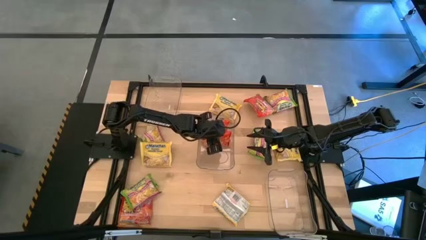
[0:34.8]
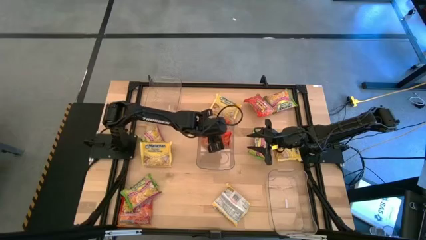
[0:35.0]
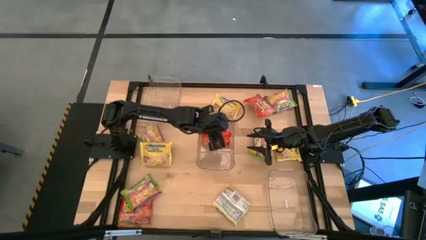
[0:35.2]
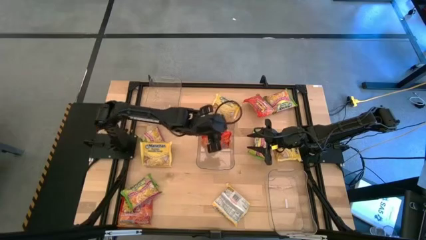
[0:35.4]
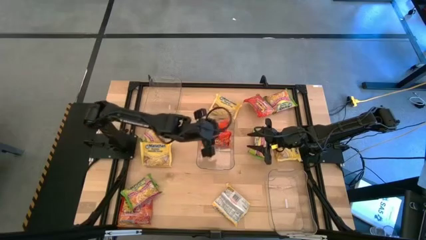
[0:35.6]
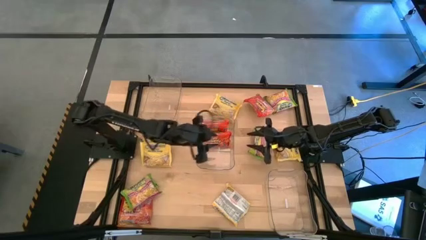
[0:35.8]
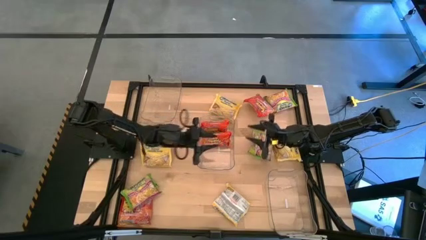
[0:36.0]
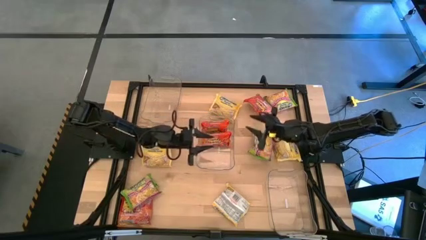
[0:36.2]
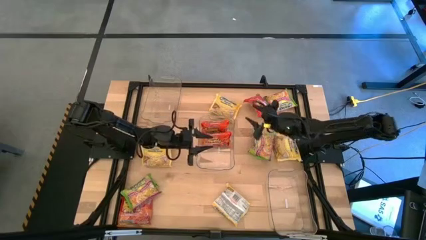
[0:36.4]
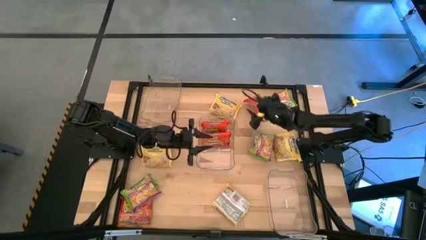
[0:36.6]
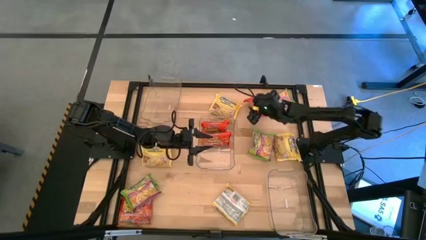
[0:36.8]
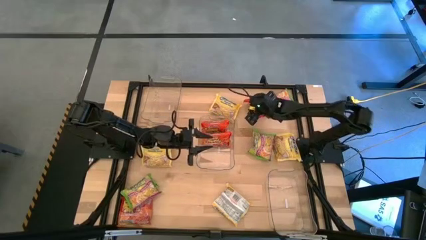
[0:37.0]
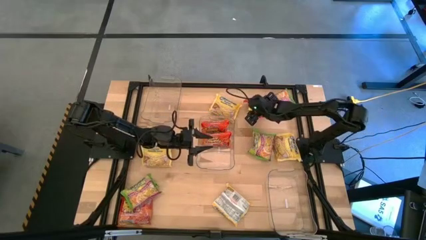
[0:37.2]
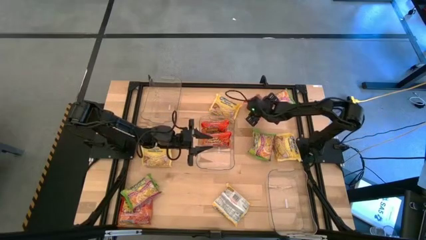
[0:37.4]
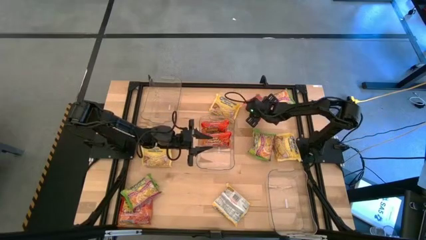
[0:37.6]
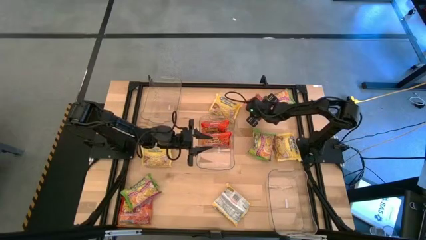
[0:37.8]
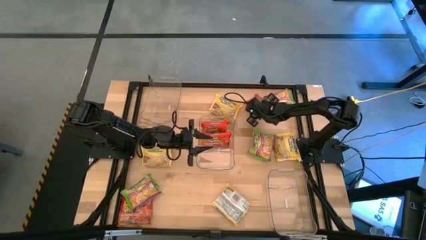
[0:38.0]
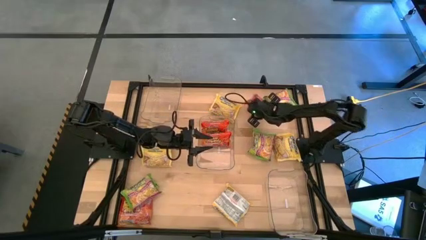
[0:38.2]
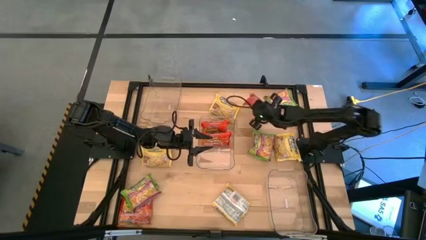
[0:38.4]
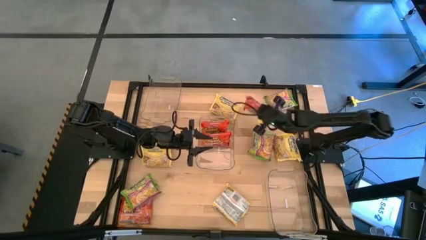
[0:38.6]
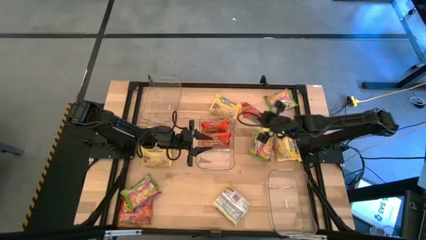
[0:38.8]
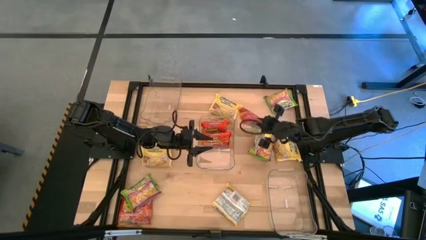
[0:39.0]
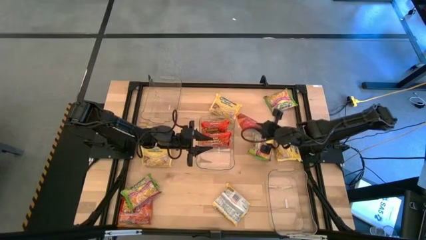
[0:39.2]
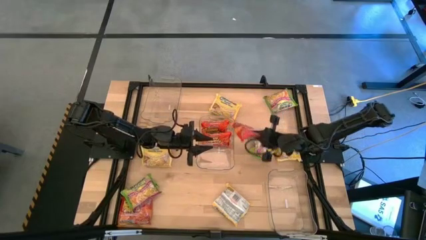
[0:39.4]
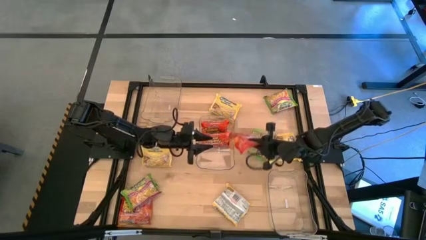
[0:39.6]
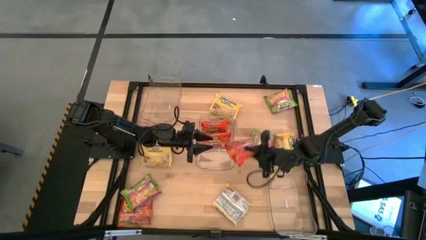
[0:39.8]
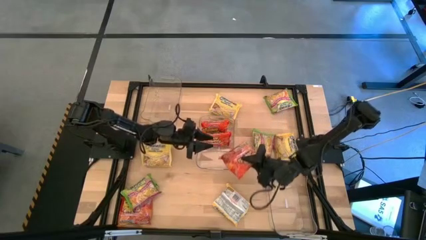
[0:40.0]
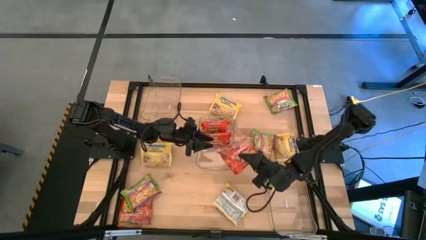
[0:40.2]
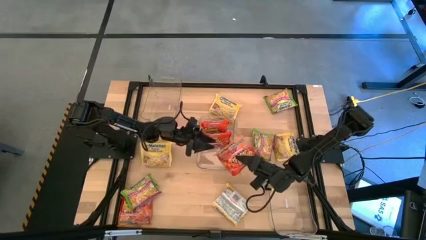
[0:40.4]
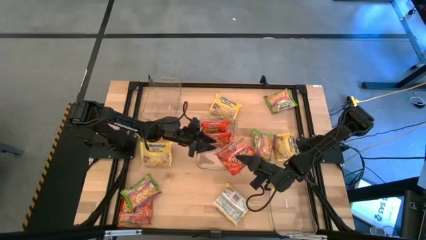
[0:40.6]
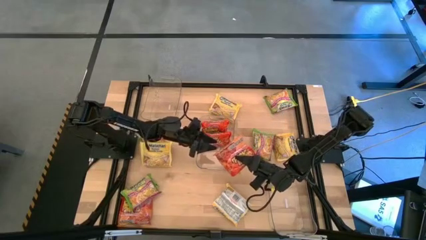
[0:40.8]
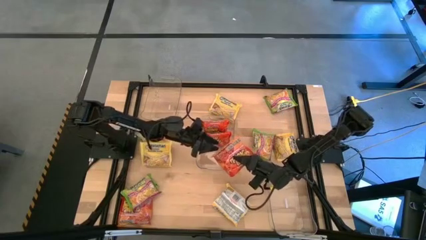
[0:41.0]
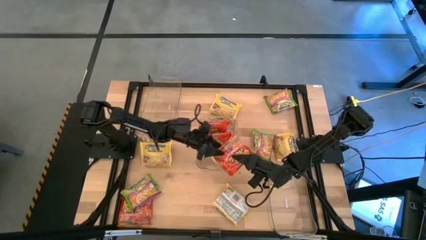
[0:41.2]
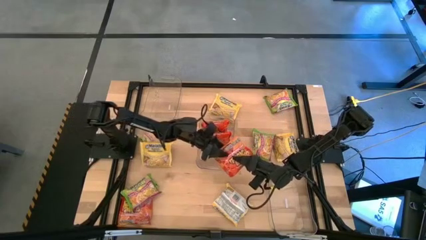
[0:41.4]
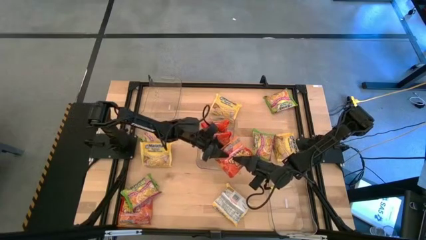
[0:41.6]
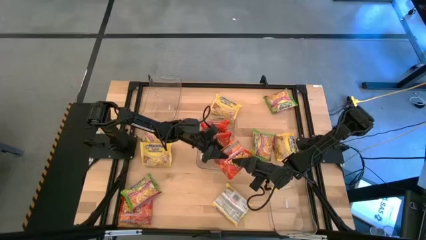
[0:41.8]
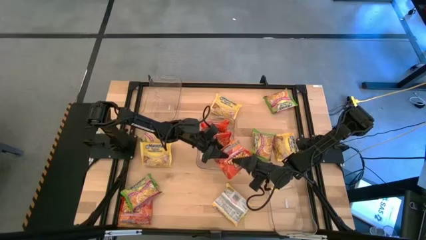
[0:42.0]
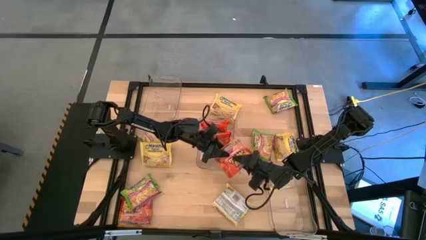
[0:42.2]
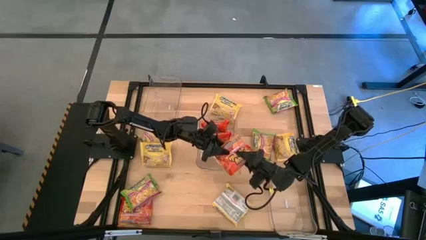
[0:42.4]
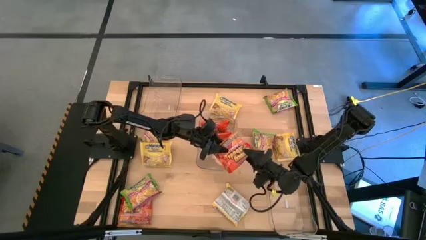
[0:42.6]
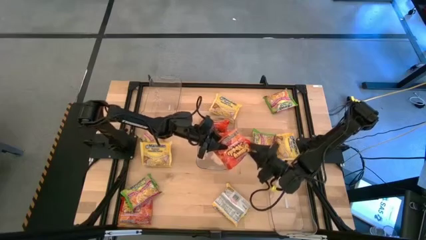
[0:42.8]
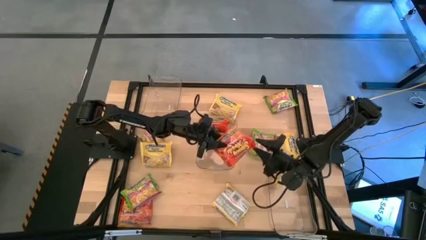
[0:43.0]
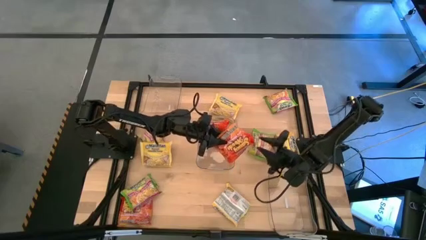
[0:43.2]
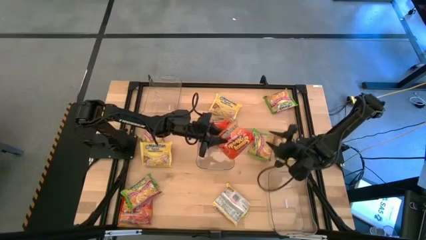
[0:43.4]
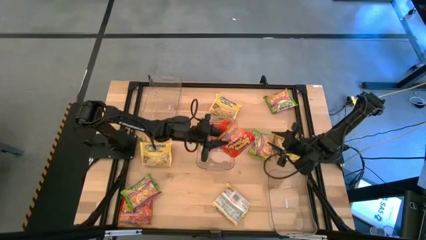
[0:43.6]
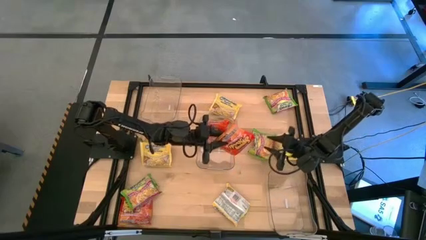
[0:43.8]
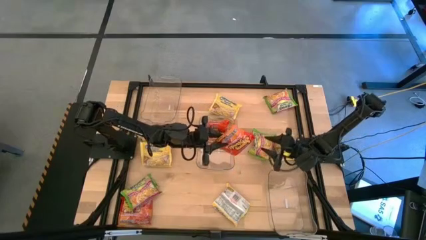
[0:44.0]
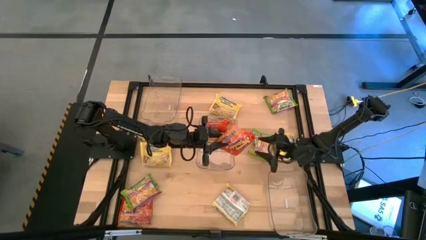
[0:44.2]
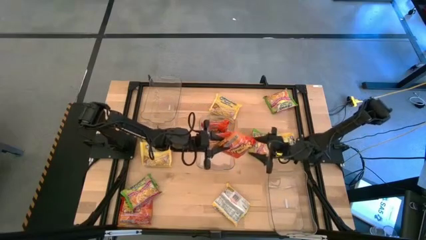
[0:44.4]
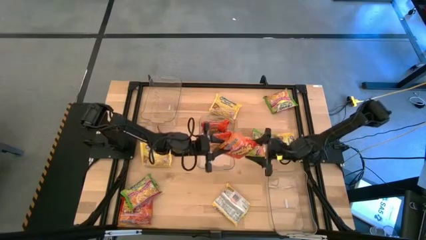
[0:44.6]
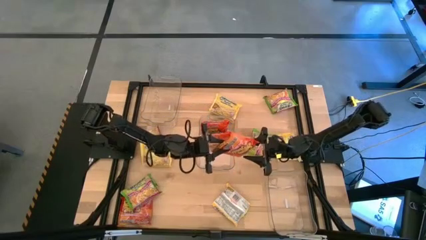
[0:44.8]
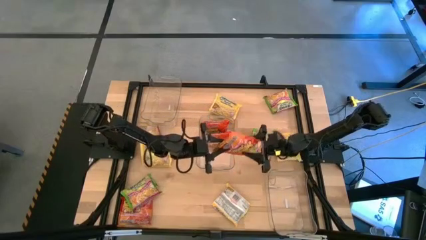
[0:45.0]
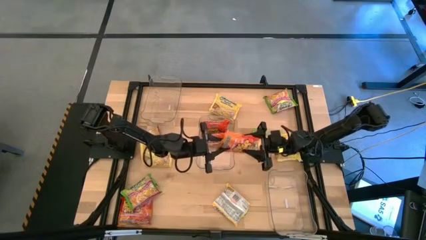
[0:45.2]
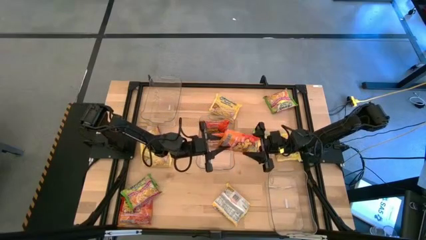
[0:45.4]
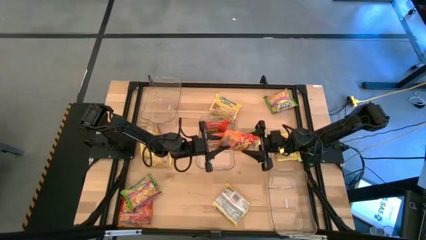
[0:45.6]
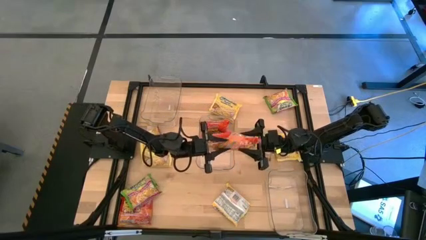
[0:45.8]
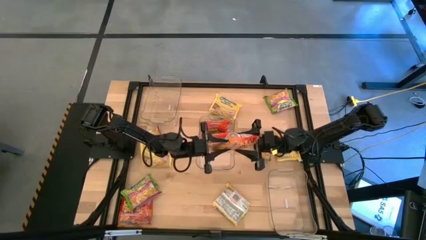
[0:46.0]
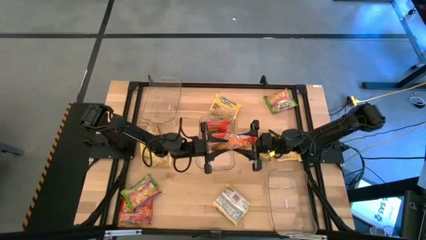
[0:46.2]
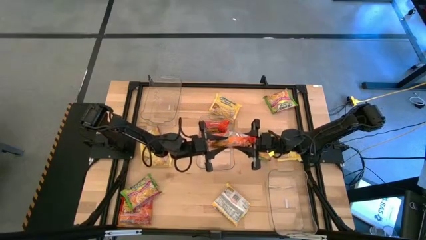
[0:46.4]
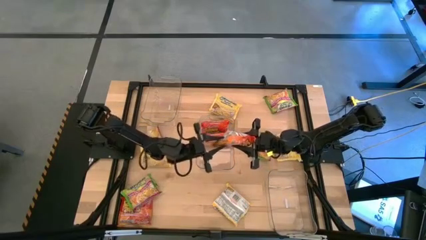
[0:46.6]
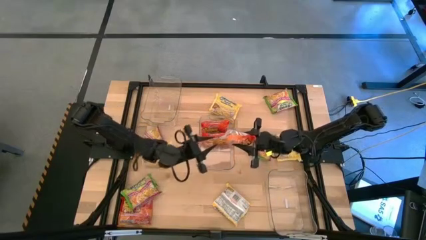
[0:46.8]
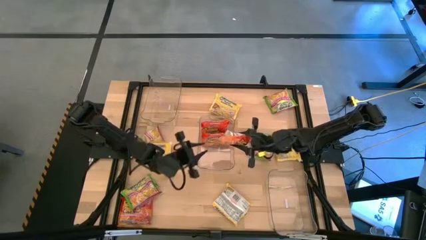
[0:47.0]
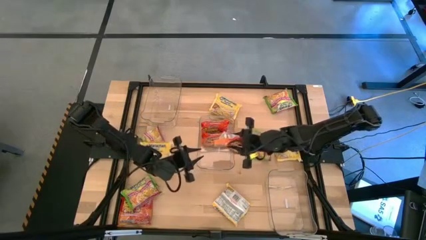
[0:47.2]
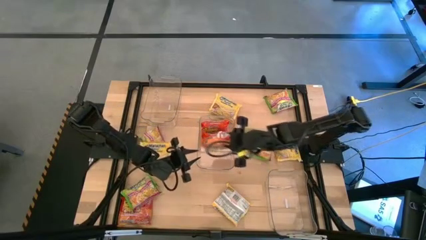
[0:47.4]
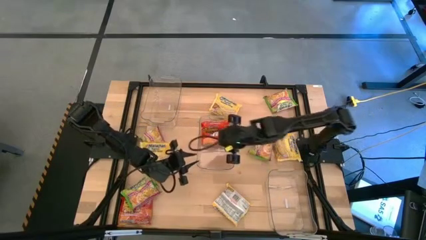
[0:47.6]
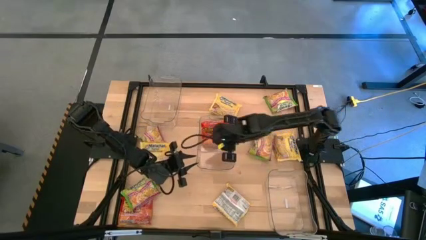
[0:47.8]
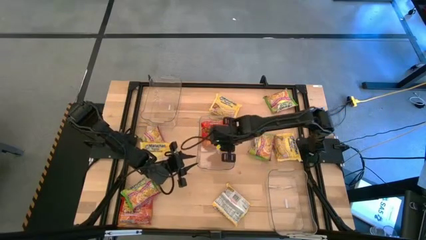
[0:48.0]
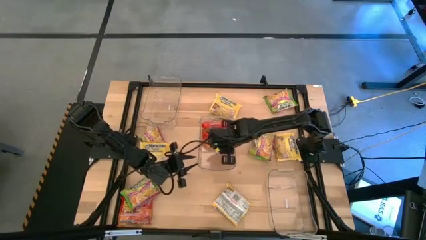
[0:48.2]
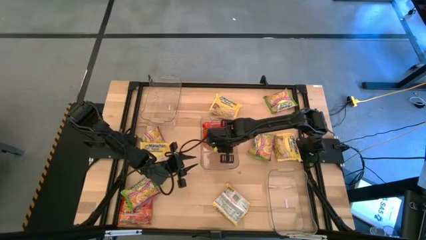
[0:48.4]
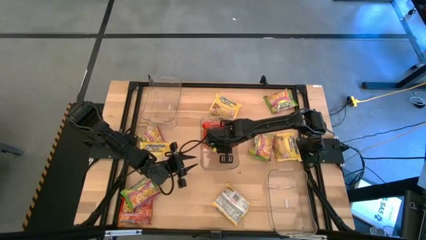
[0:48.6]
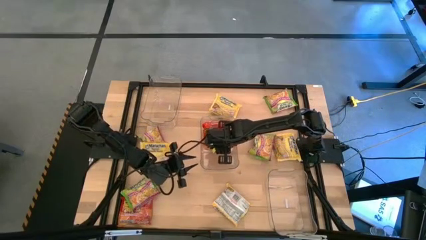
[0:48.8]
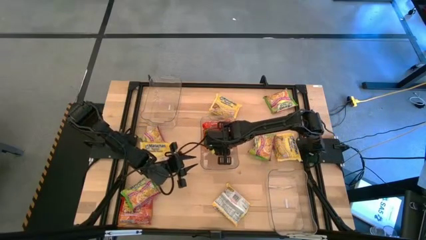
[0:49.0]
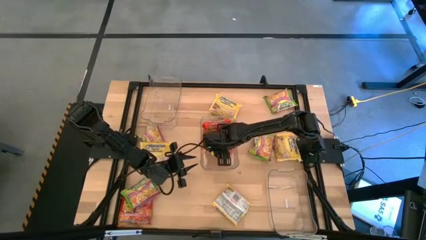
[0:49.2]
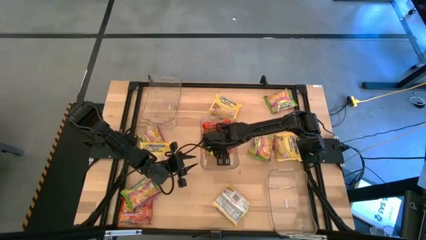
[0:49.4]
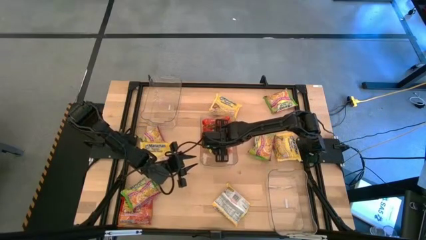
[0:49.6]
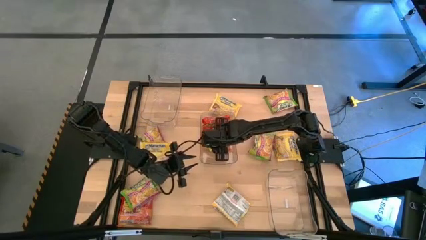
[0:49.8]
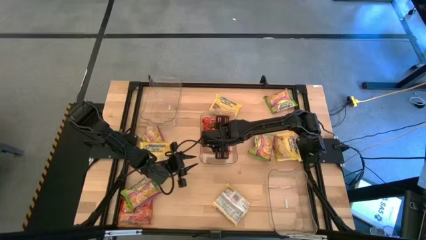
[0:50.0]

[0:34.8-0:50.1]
Task: Sort Maruchan noodles
Put the top orange noodle pack into the middle transparent bin
